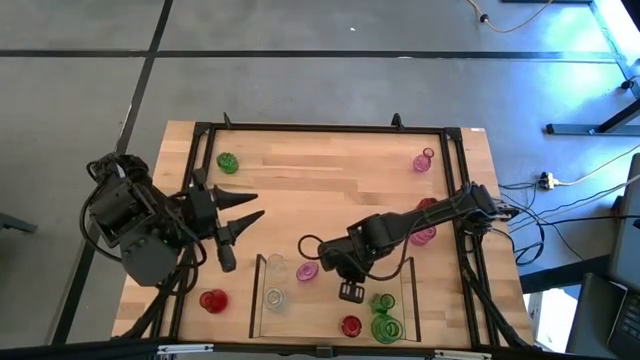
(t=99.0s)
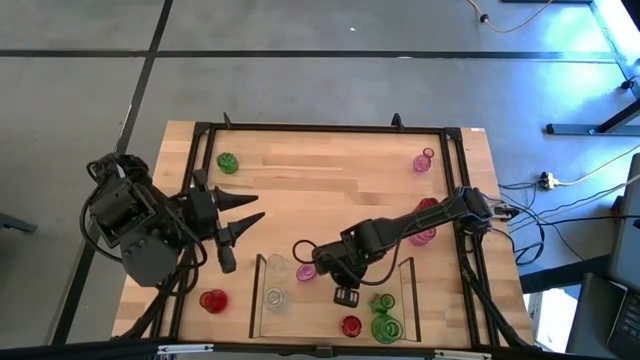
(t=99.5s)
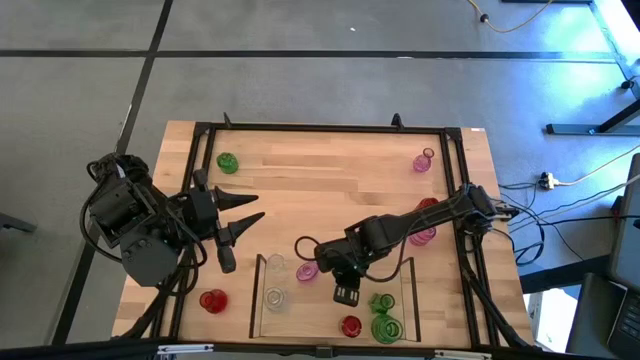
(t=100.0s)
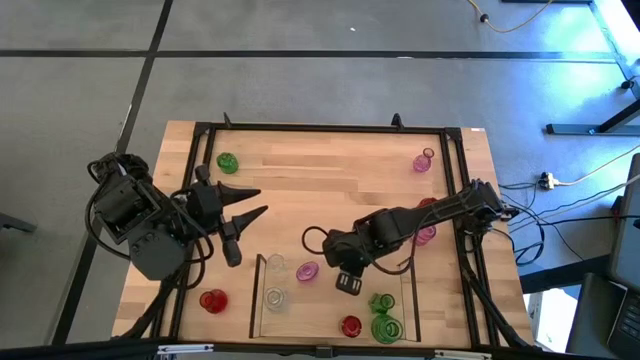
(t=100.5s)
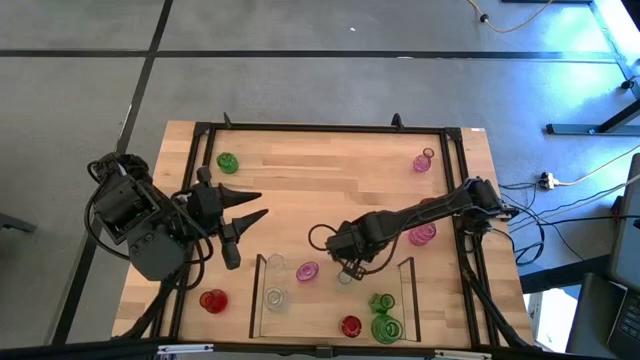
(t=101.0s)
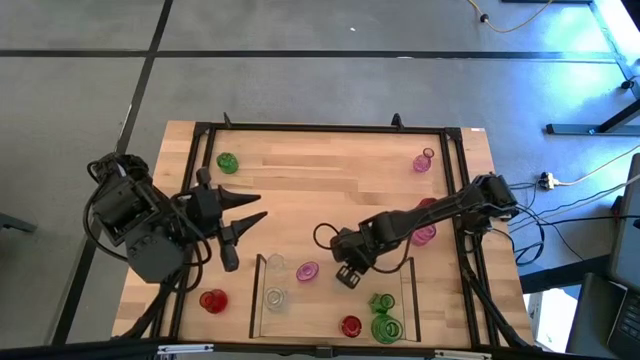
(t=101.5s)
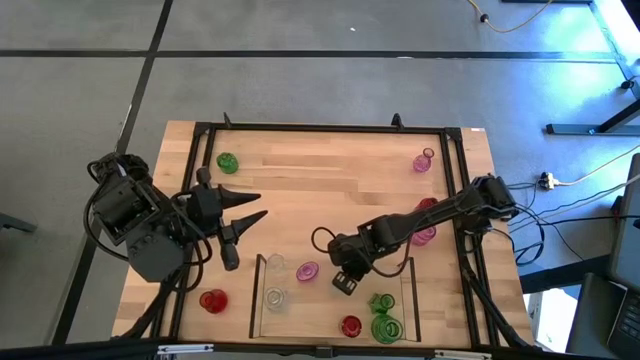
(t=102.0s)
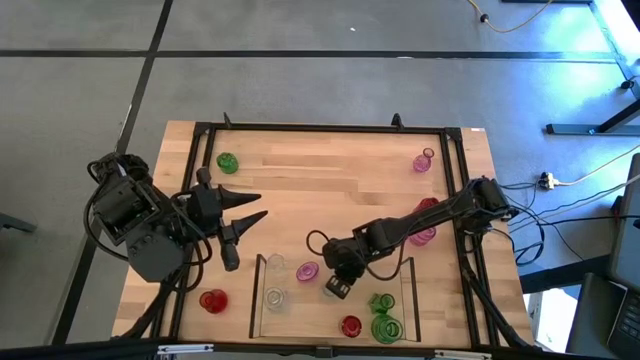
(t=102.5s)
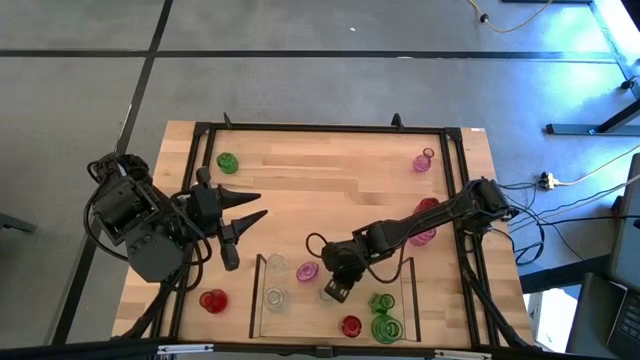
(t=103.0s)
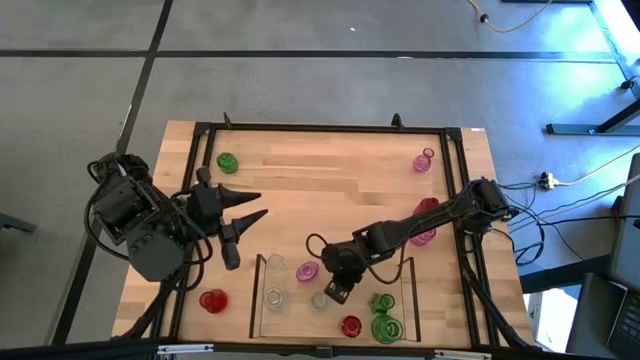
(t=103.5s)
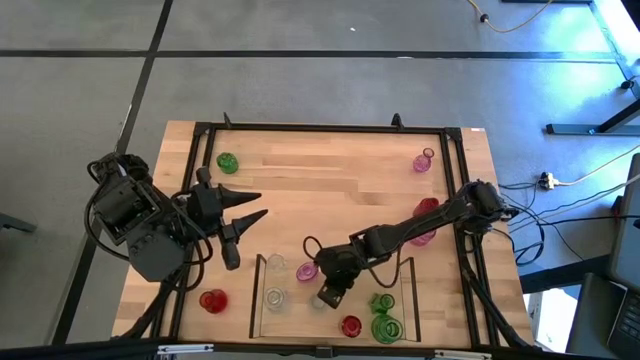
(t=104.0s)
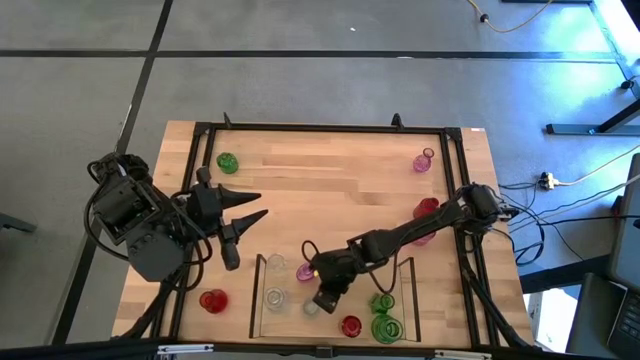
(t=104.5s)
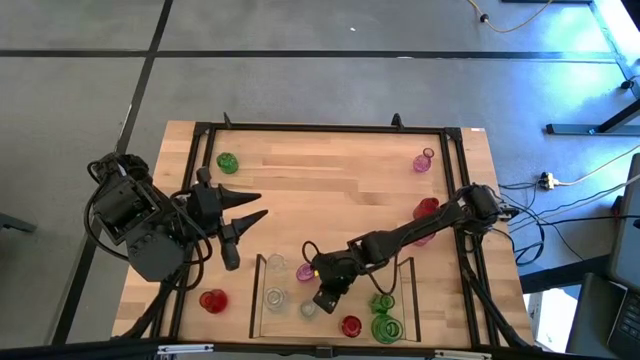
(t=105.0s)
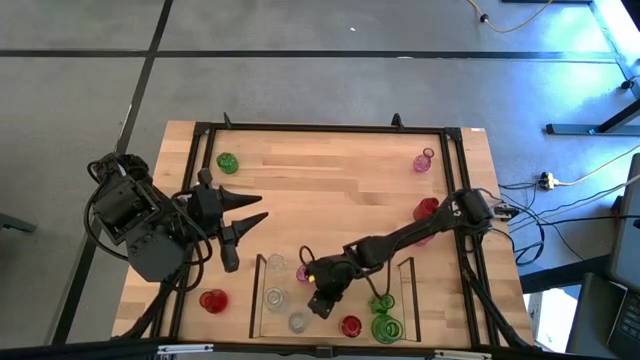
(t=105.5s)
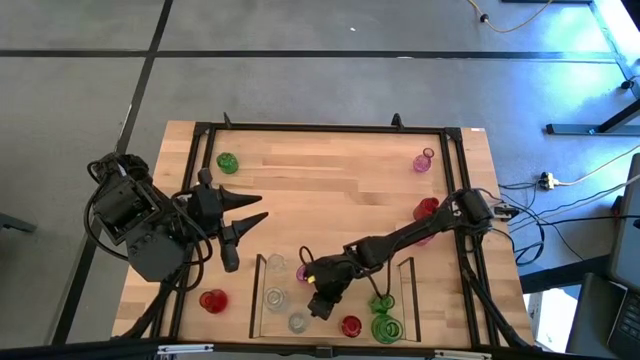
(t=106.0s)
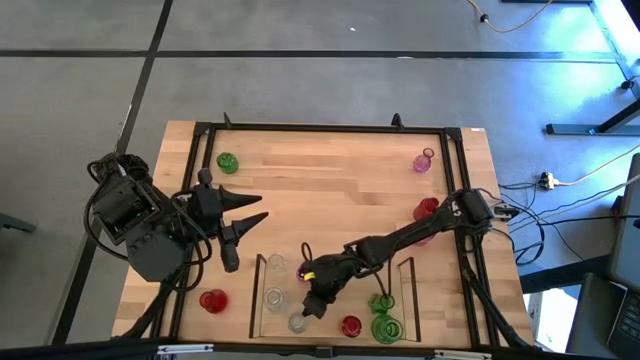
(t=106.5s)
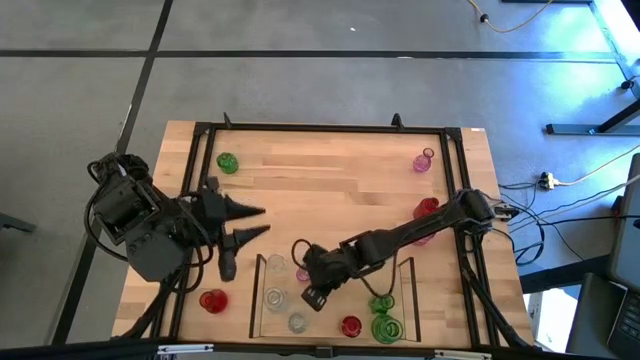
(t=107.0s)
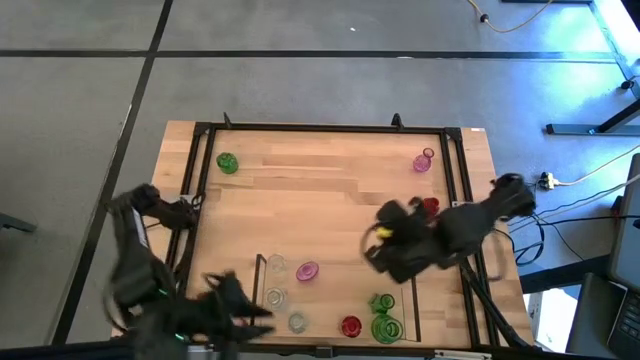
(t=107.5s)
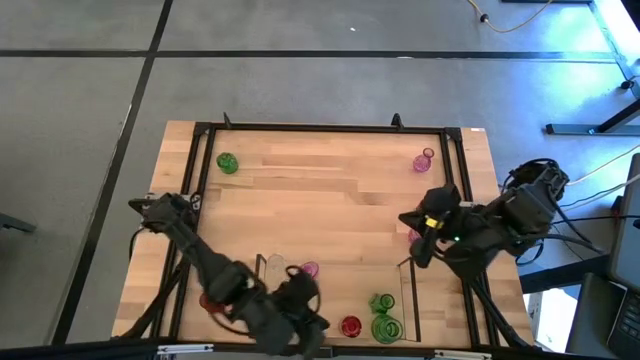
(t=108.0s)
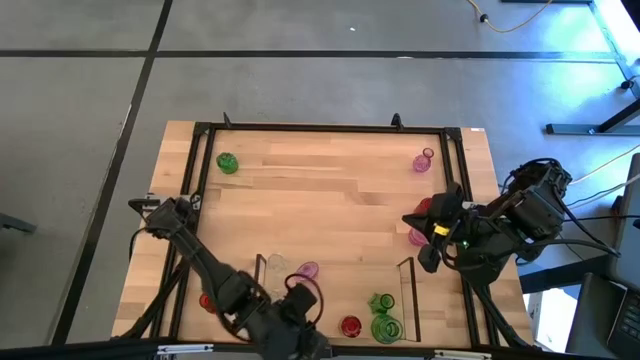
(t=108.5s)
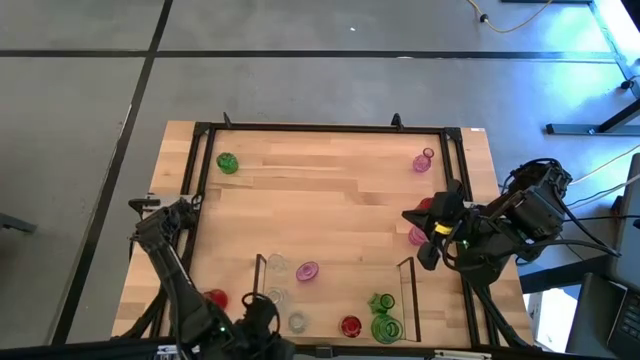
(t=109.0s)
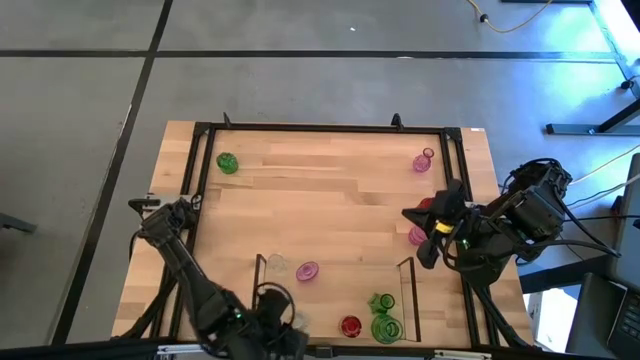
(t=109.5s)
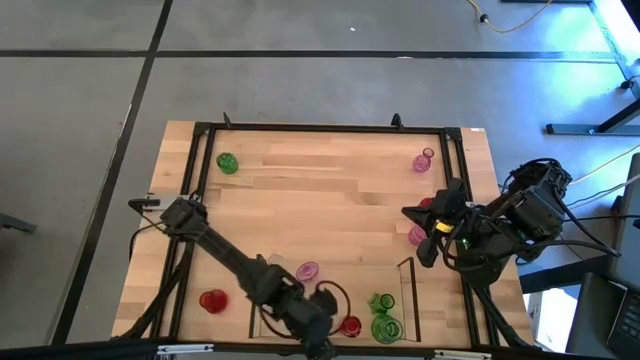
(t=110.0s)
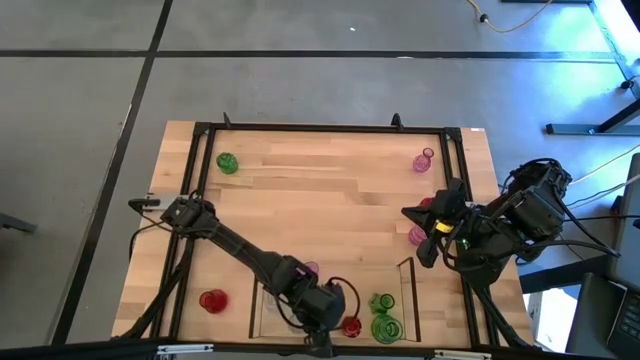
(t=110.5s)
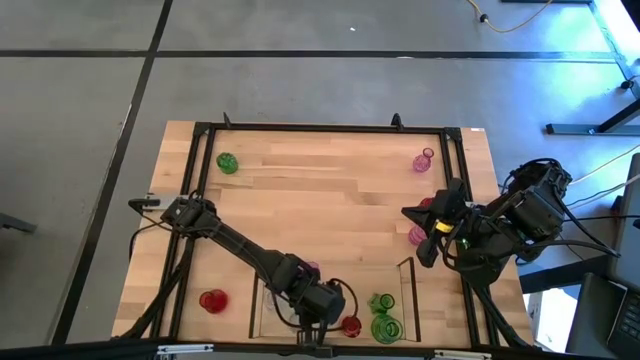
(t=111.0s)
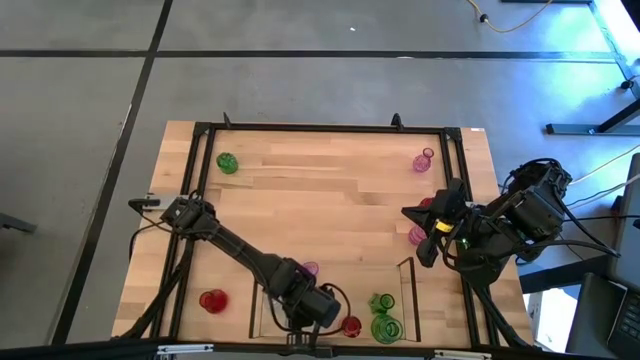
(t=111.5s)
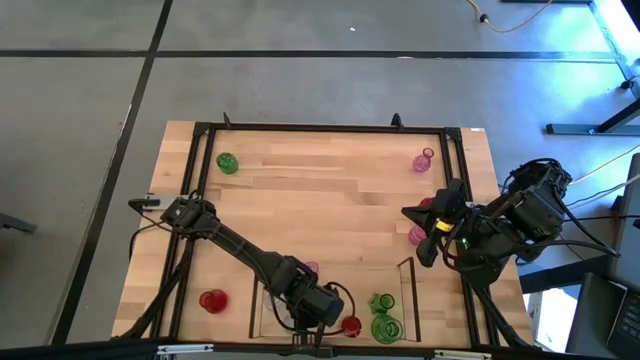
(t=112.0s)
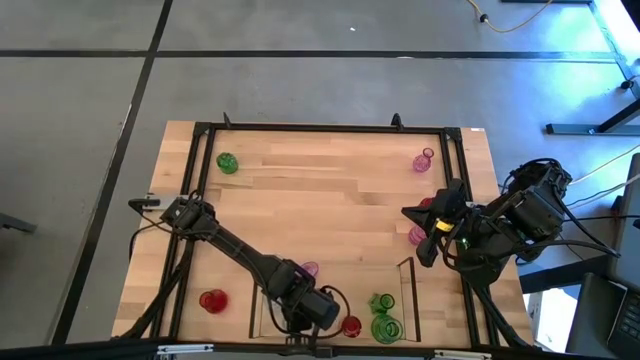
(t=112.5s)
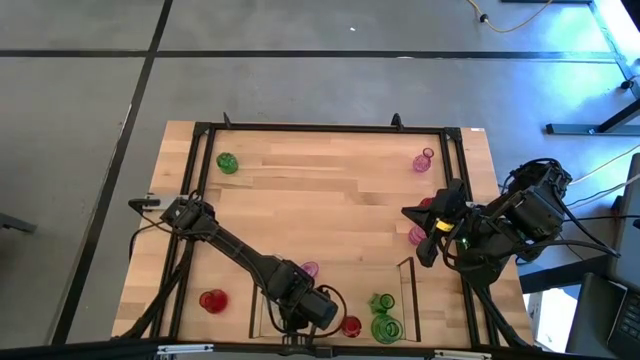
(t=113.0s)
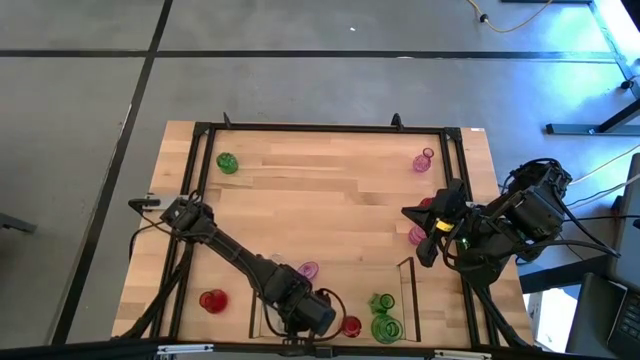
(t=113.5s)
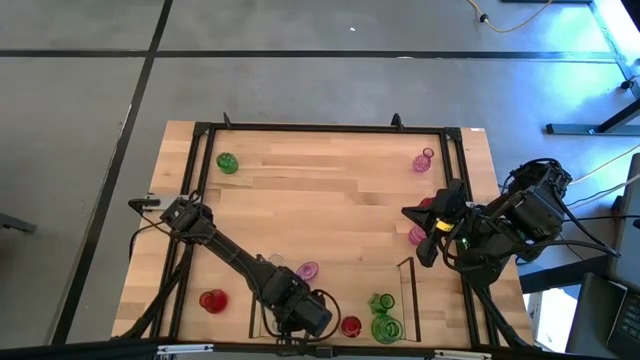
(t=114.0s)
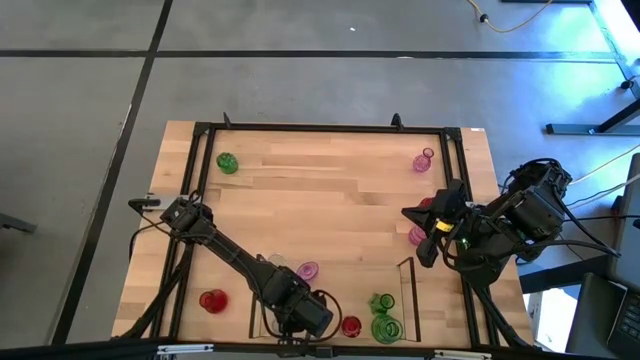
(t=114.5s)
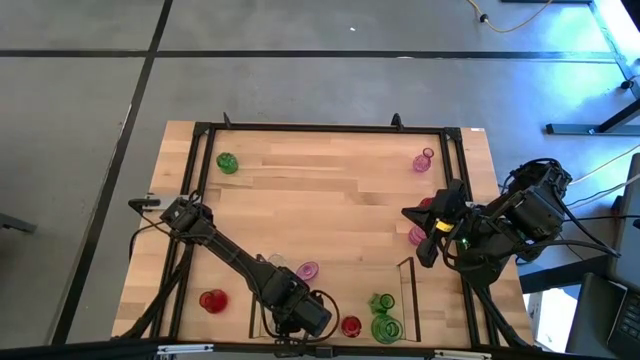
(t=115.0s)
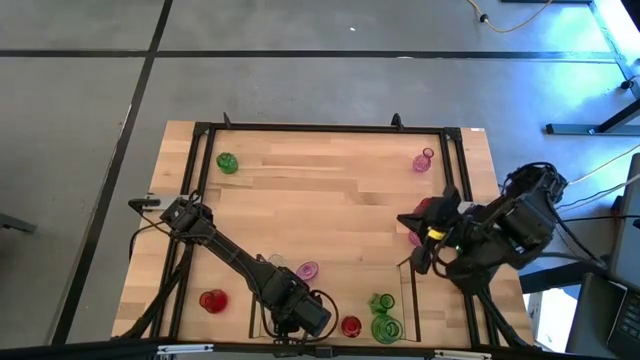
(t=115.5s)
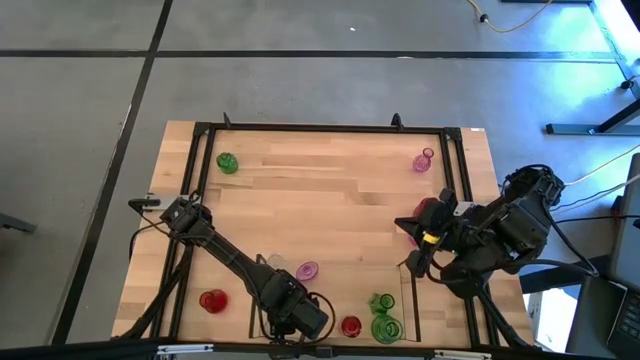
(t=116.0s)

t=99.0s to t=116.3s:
Task: sort vases onto shelf
Put the transparent vase aligned with the other transparent vases on the shelf

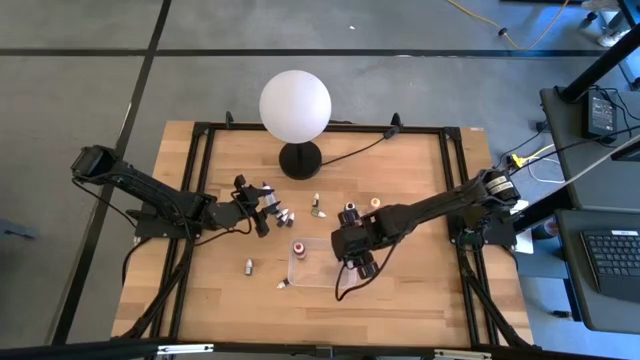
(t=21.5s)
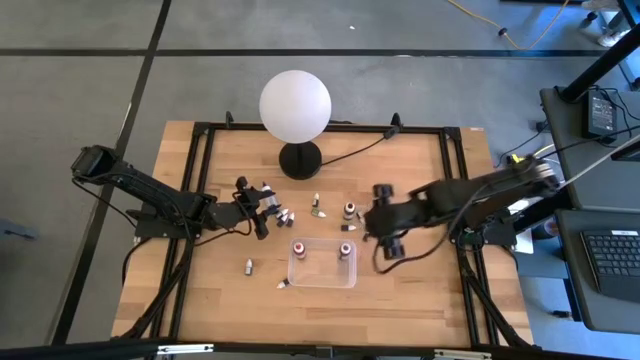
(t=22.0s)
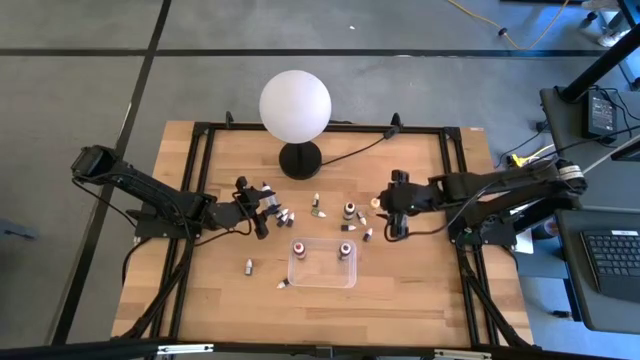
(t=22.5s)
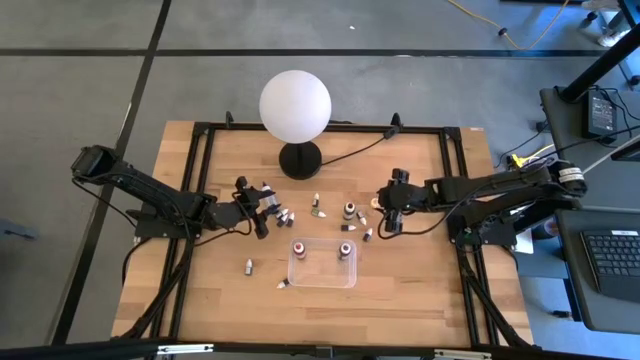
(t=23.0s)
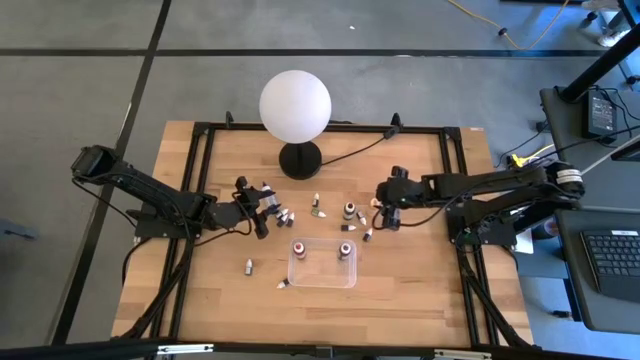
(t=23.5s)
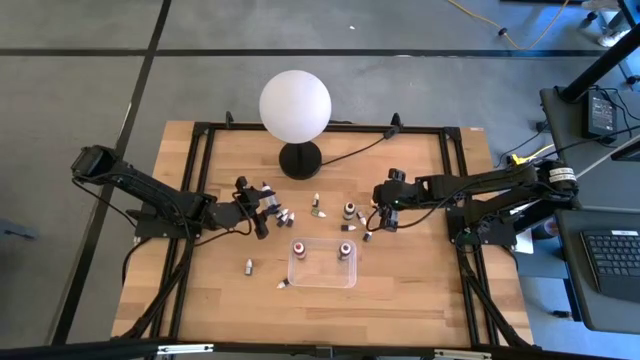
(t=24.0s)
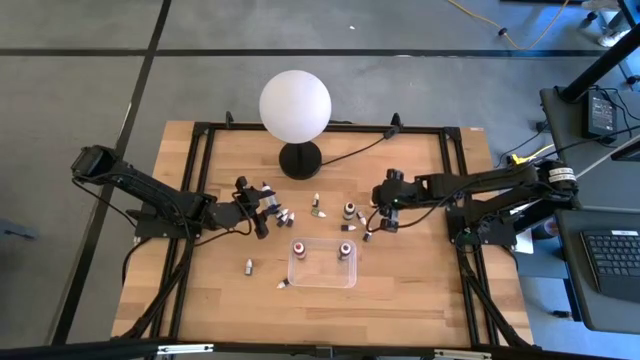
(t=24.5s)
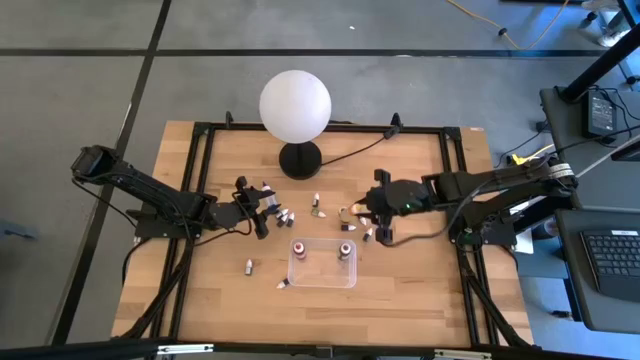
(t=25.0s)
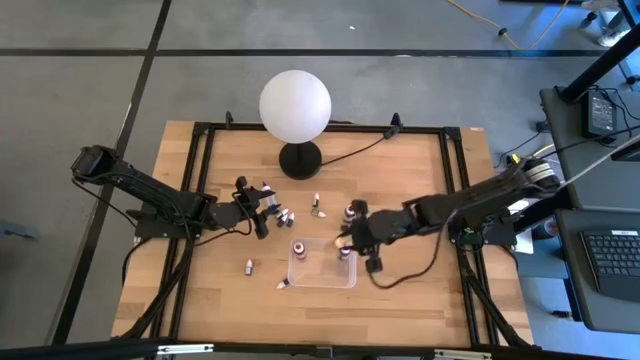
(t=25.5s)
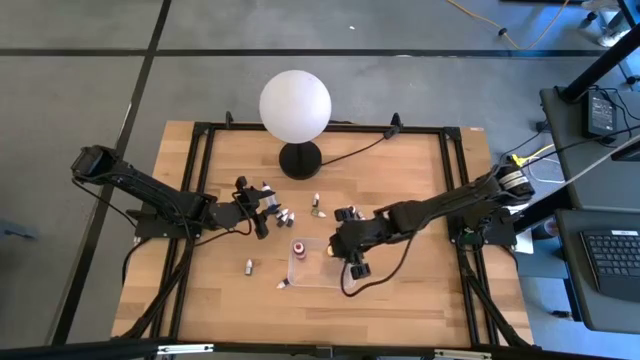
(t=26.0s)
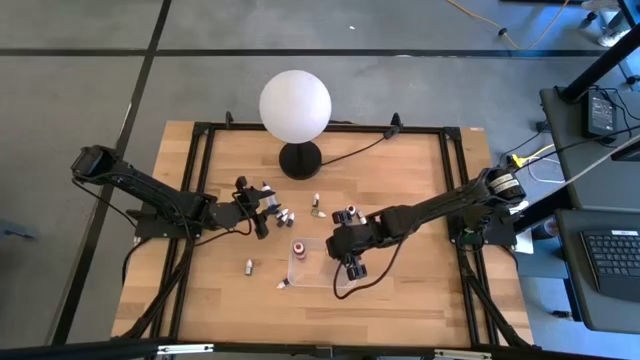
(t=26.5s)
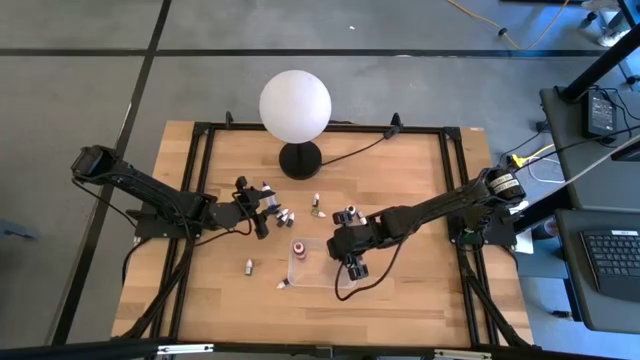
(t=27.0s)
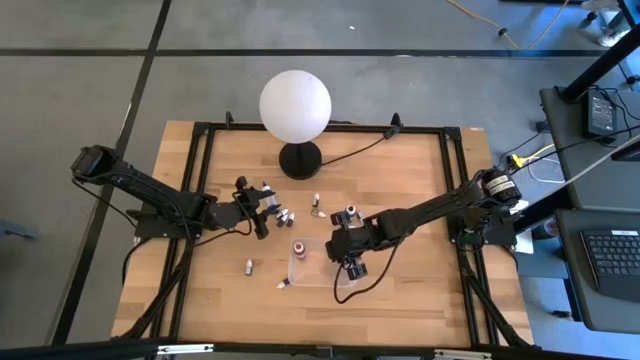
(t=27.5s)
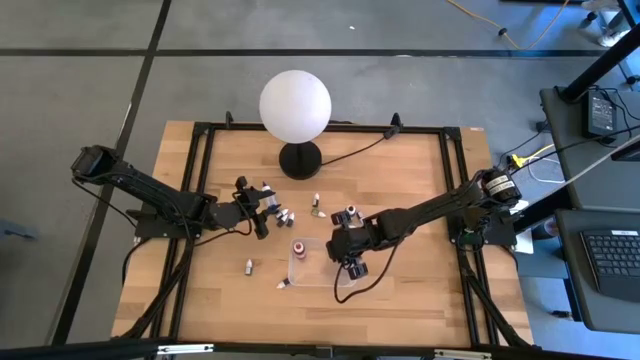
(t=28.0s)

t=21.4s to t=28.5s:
Task: Pick & Place food coloring
Put the large yellow food coloring bottle into the transparent bin
